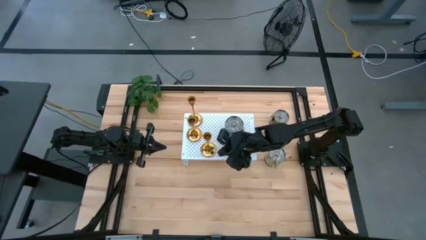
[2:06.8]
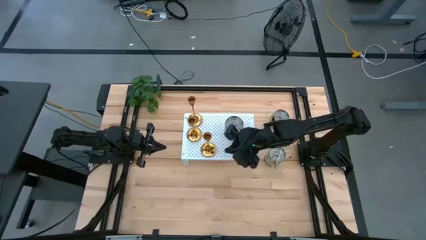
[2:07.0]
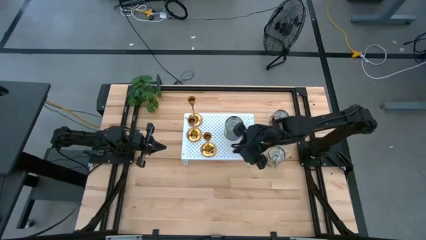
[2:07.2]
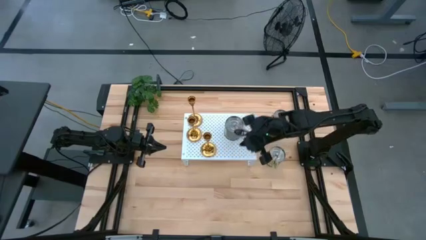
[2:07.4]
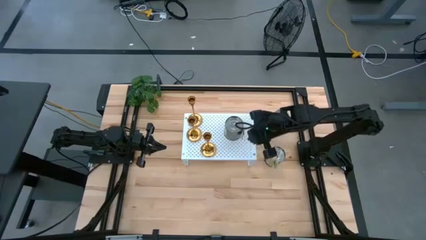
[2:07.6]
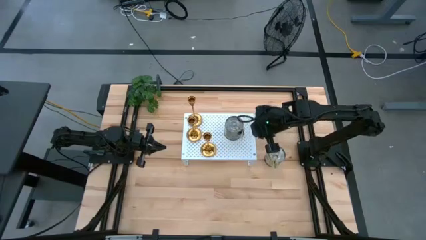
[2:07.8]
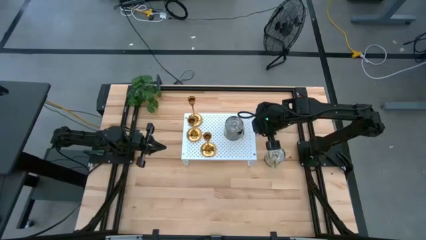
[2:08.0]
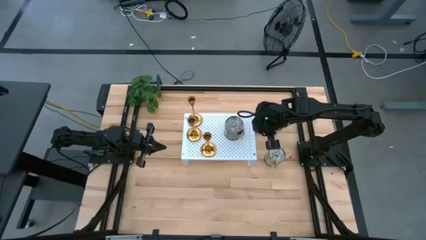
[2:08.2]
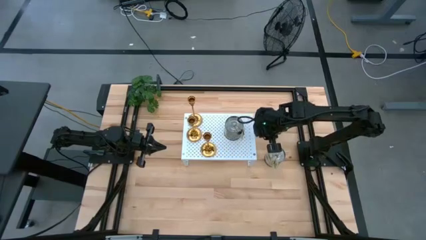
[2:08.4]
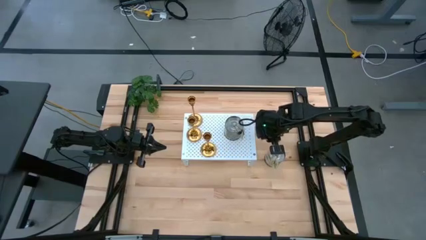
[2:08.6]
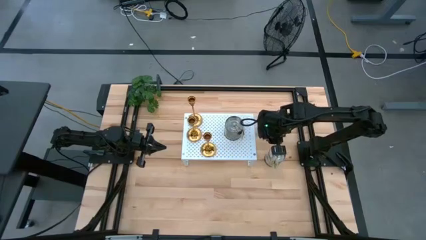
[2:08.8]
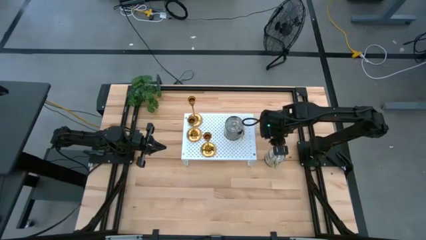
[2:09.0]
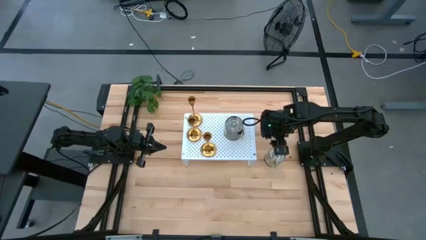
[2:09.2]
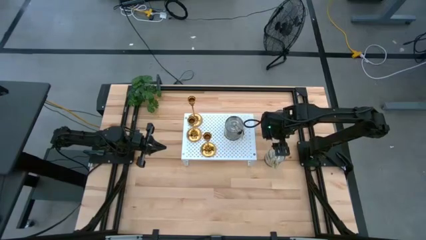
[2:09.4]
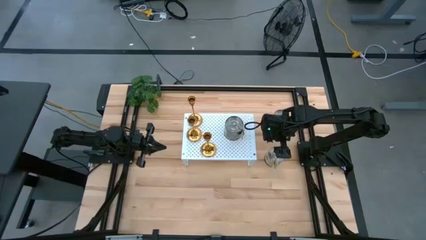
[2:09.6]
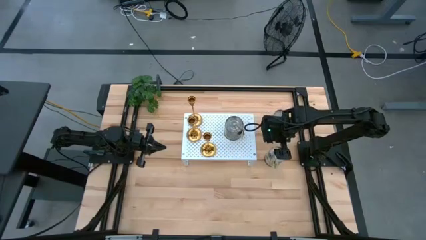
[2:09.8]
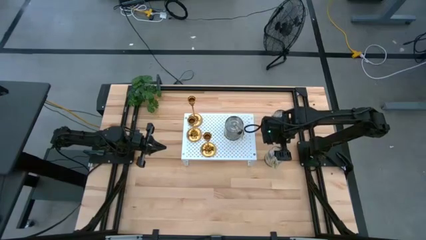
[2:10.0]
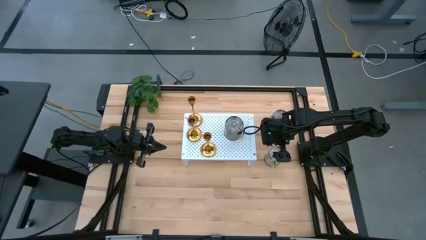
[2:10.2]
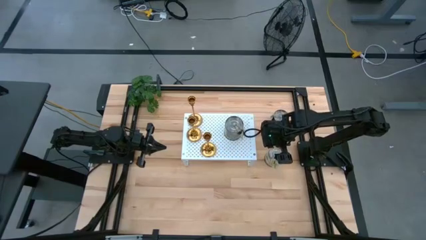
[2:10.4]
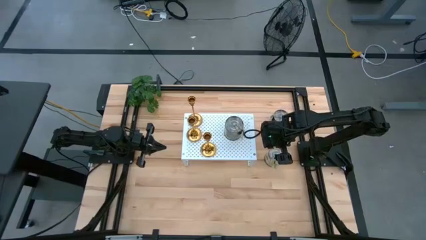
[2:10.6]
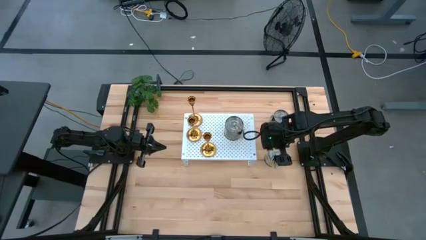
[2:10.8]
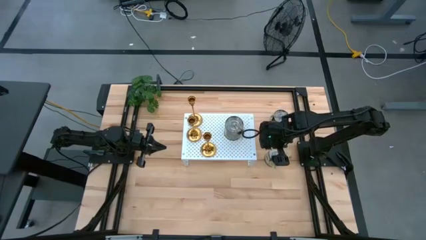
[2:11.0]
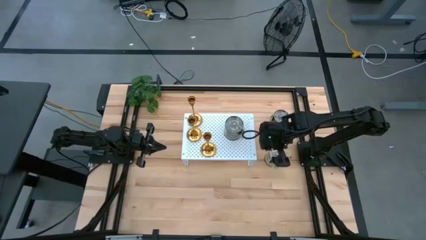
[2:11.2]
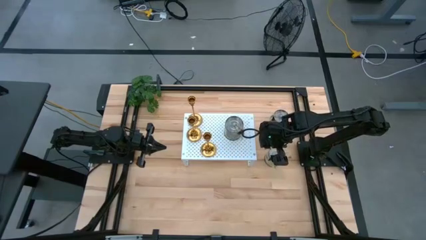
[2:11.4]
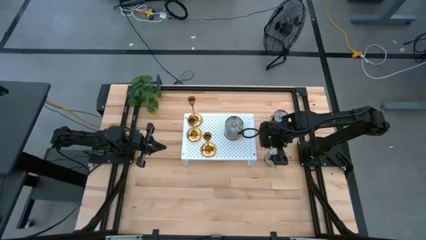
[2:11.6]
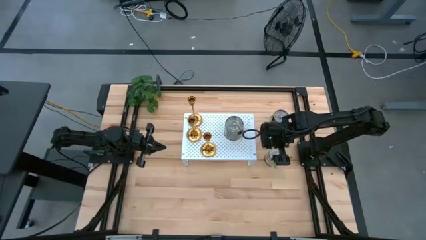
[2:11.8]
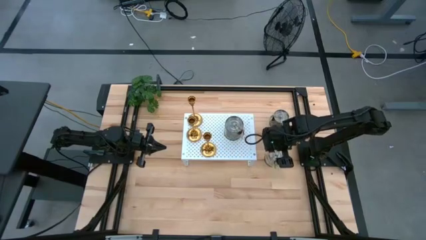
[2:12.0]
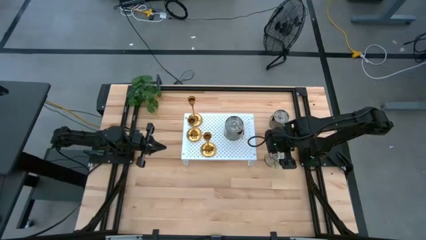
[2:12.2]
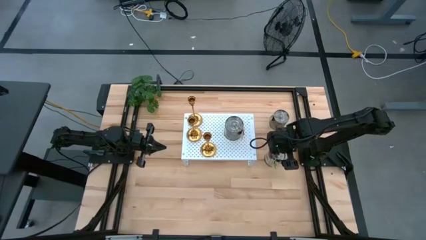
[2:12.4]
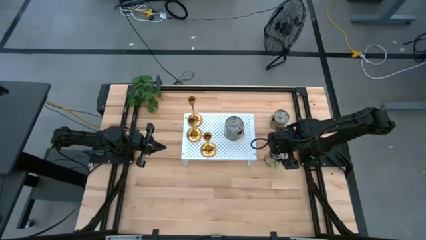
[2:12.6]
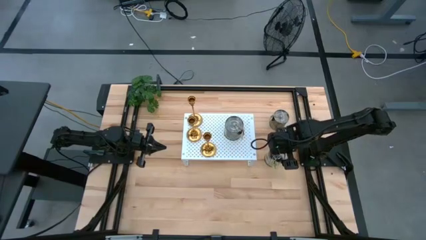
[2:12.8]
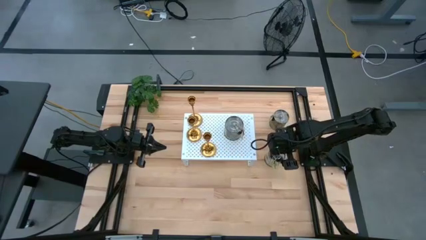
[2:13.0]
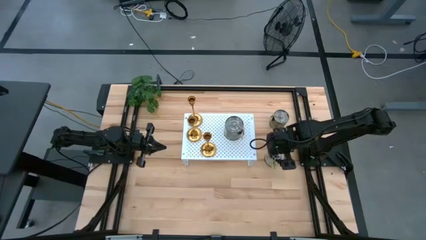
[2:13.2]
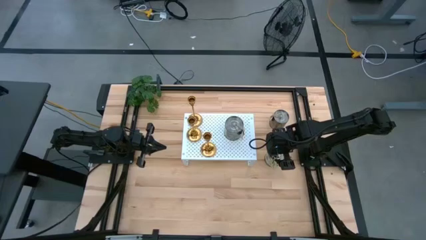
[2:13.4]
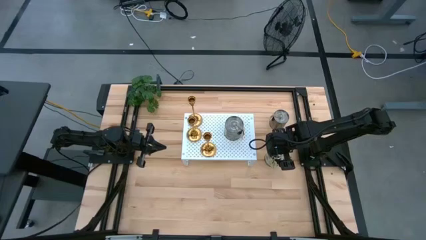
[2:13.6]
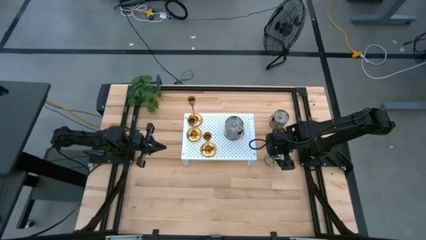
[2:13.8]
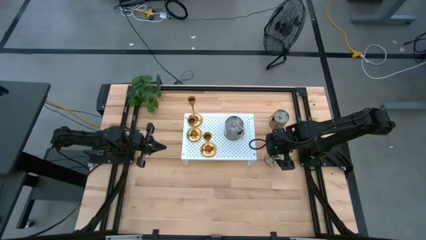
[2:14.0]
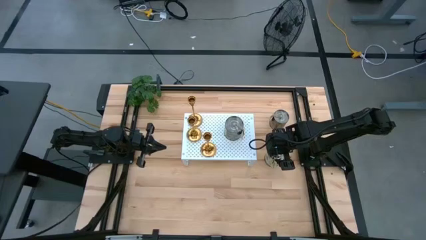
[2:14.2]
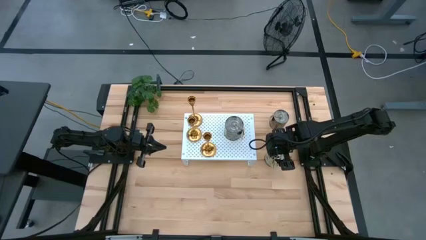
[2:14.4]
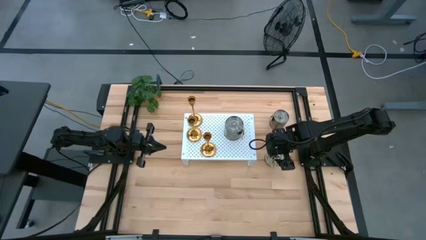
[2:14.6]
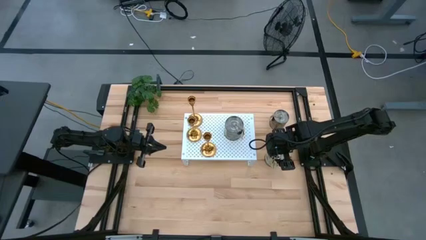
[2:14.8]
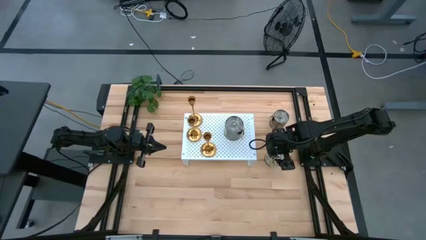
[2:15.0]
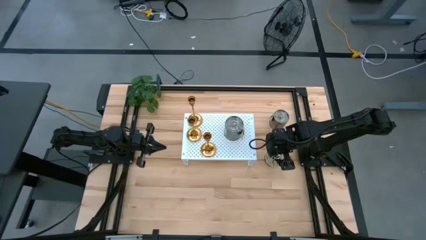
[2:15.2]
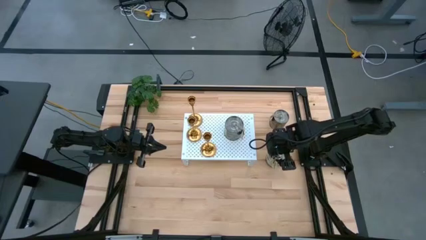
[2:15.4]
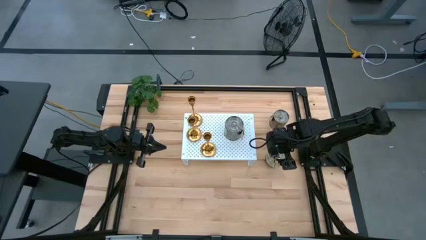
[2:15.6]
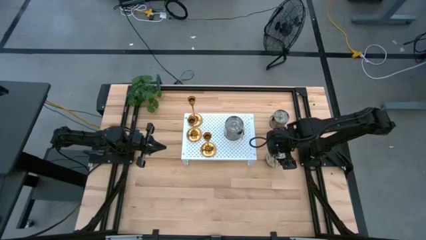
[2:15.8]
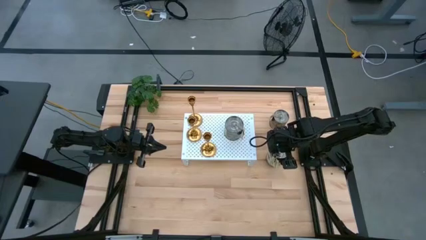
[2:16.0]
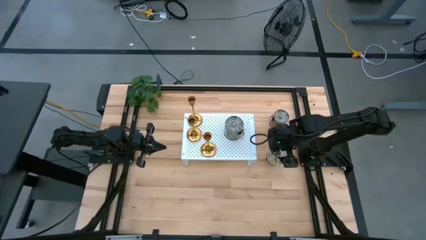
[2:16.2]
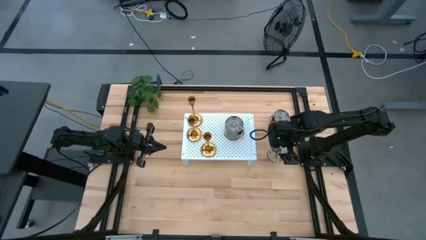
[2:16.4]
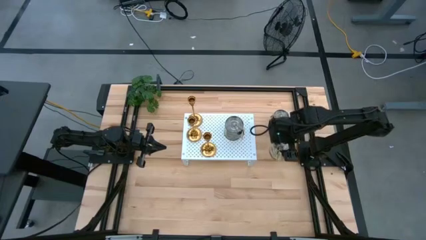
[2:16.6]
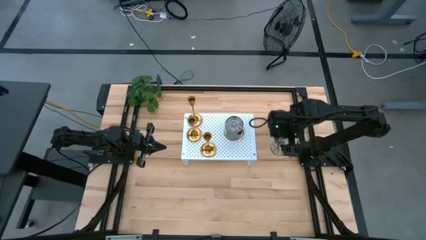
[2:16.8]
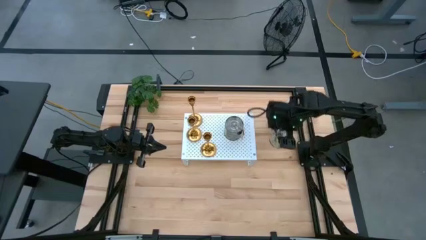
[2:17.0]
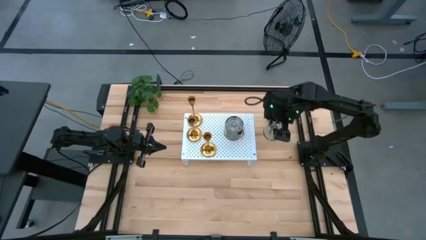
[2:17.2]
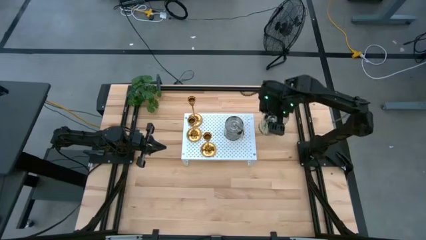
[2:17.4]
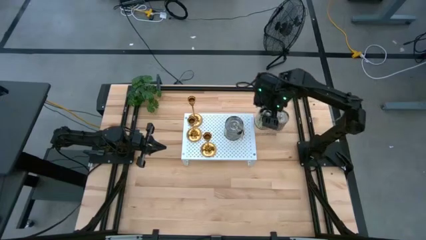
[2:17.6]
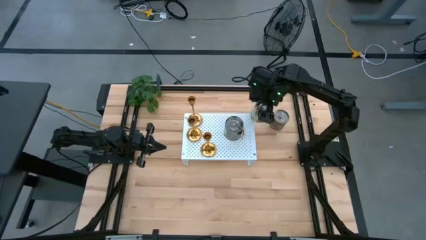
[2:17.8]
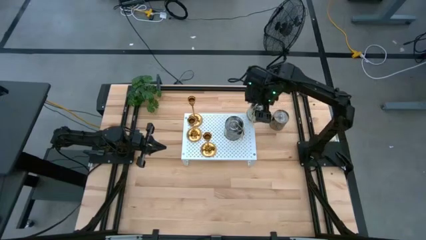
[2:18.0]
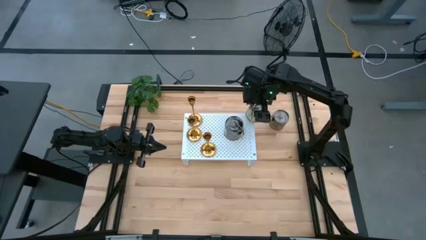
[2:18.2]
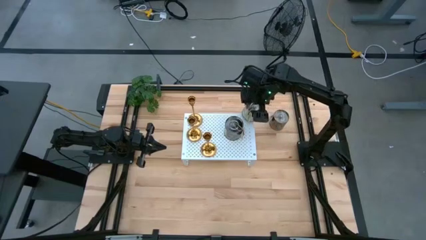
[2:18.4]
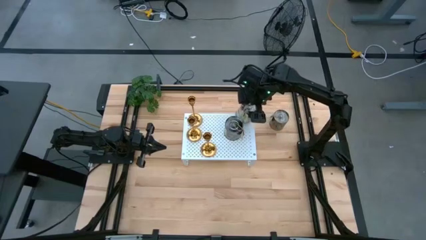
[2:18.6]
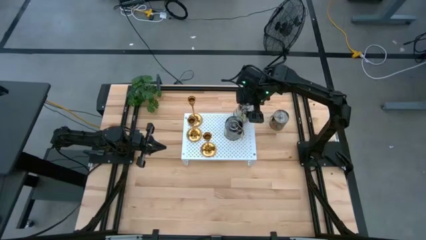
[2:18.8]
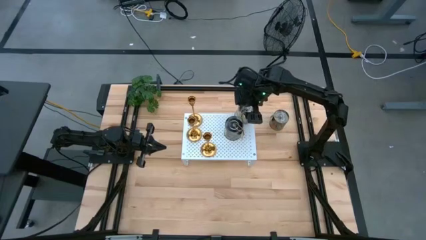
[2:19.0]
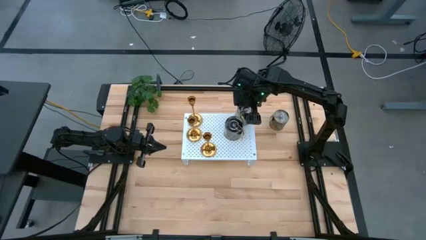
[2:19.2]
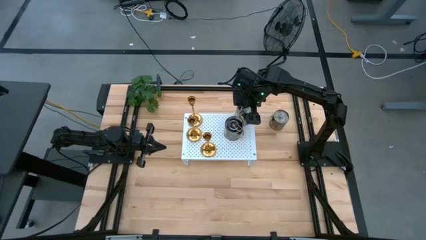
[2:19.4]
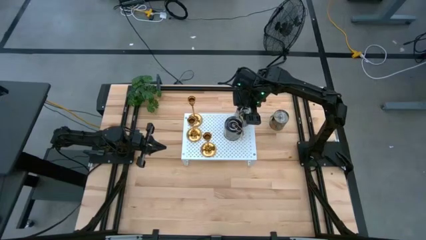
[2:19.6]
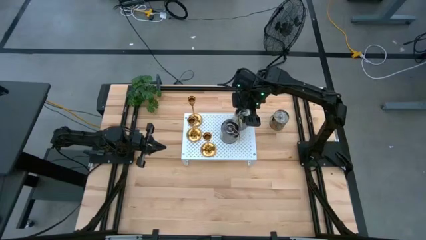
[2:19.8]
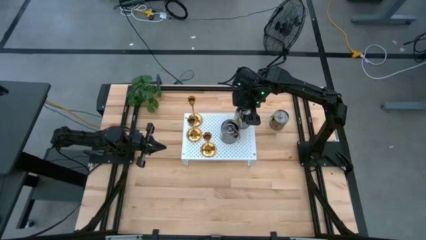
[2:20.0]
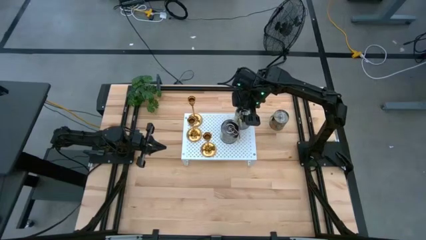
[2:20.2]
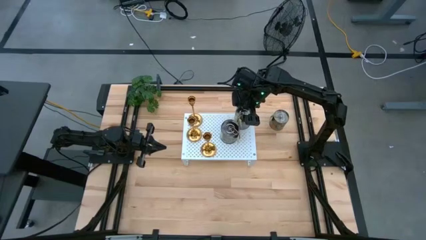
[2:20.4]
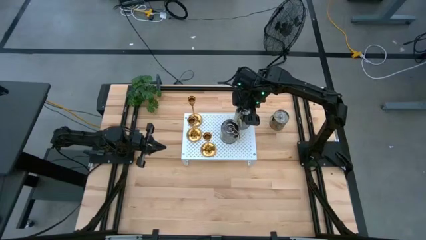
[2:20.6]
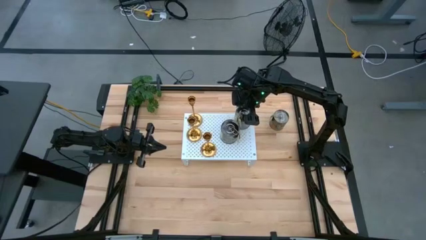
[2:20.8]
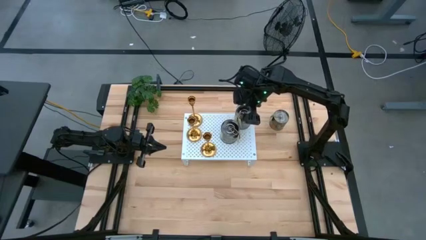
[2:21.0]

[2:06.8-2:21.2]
Task: Pick & Place candle stick holders
Put the bottom metal lid scented candle on the shelf

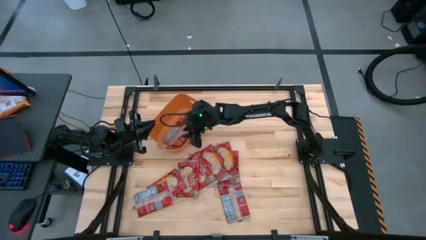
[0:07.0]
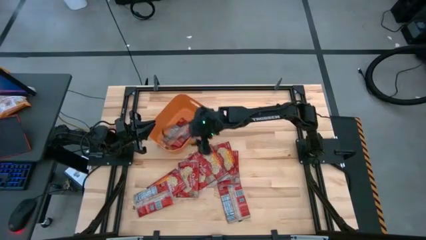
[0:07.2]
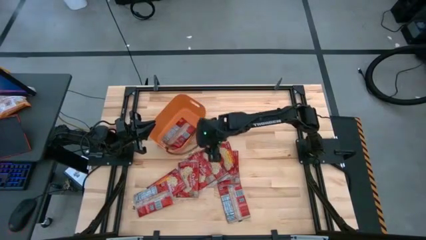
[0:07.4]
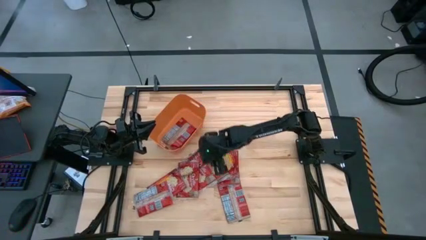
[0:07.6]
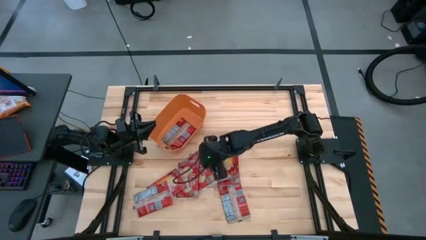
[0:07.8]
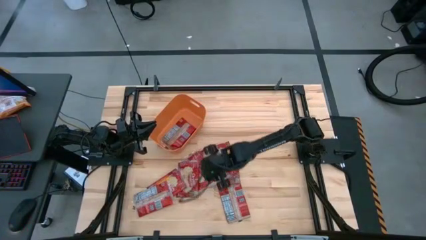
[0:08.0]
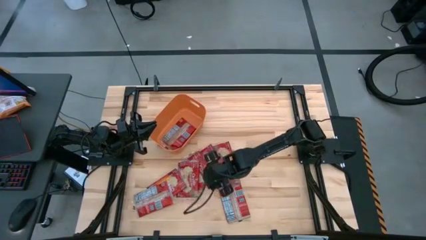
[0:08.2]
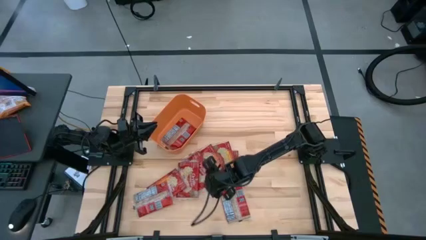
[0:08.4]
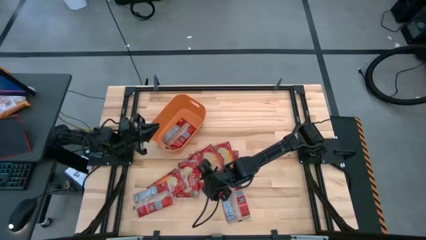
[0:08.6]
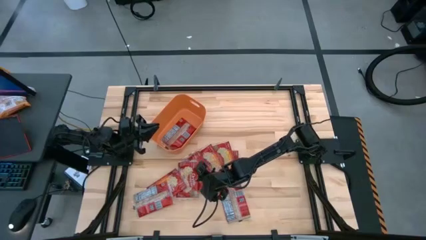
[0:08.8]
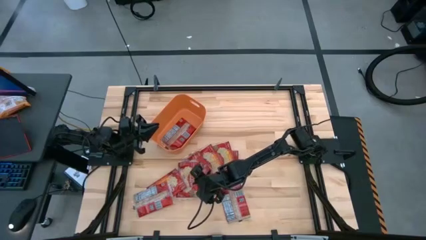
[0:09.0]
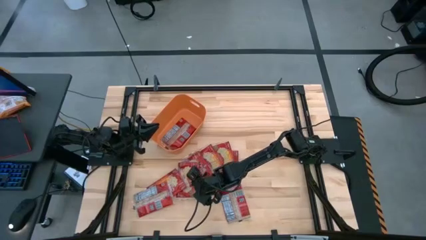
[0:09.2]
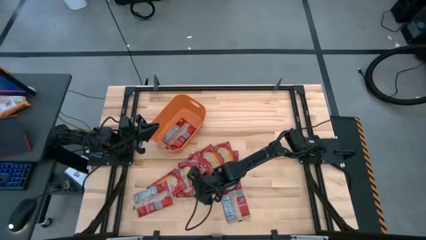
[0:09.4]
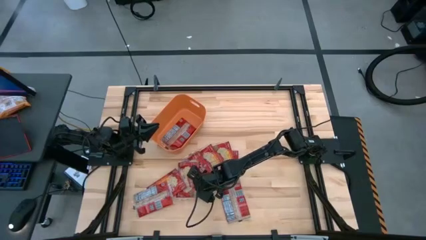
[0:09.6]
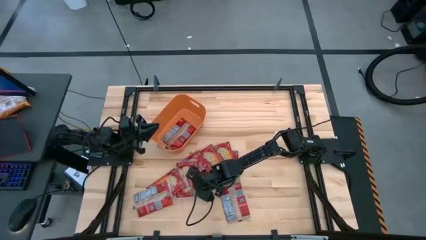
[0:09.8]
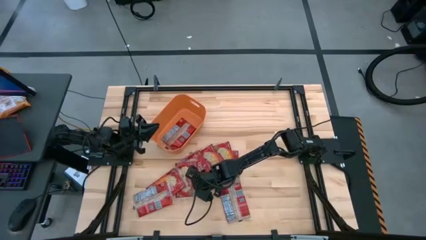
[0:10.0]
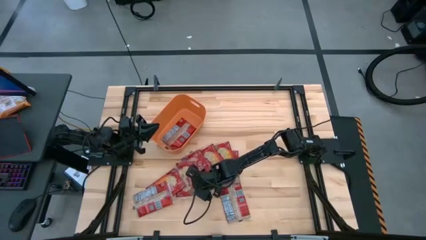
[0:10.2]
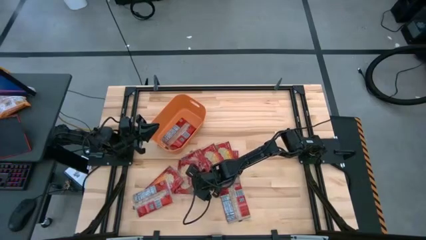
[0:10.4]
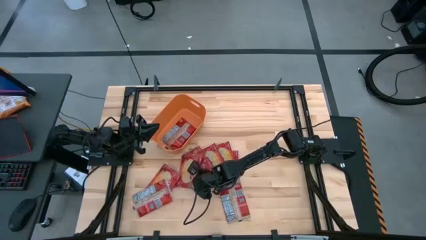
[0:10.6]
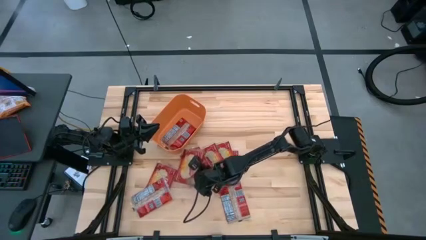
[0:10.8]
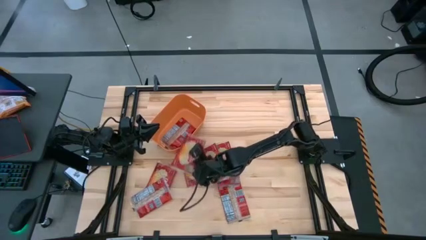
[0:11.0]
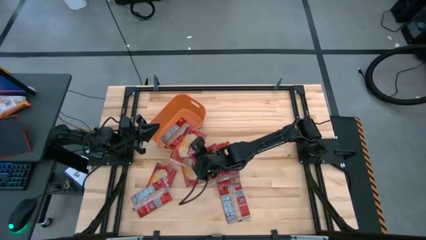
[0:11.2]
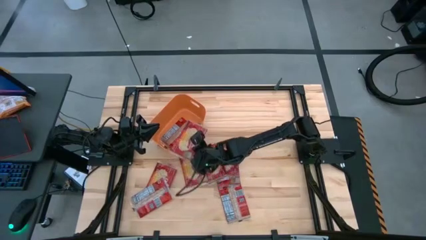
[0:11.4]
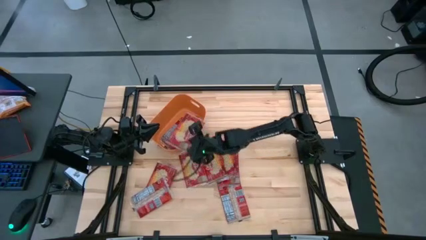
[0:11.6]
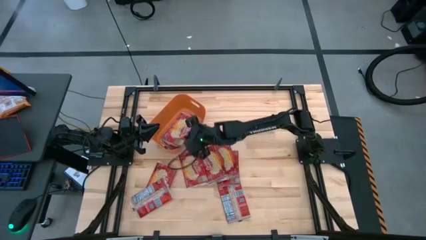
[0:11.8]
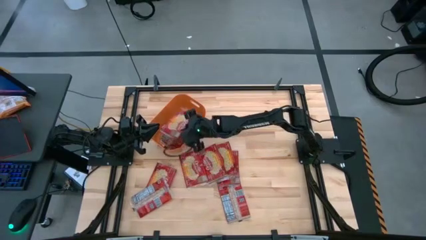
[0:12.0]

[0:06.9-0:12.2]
Task: Sort popcorn bags into baskets
Put the red popcorn bag into the orange bin
